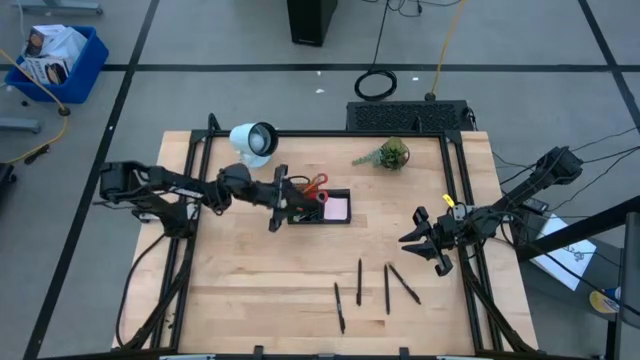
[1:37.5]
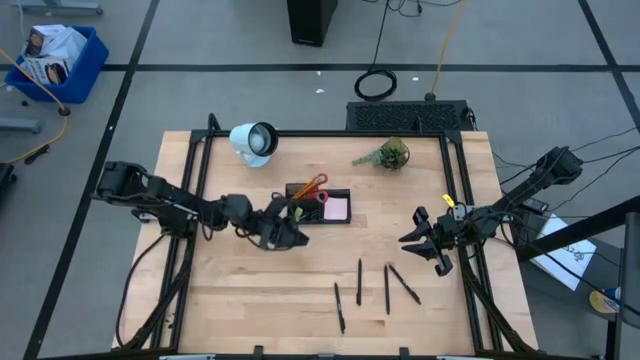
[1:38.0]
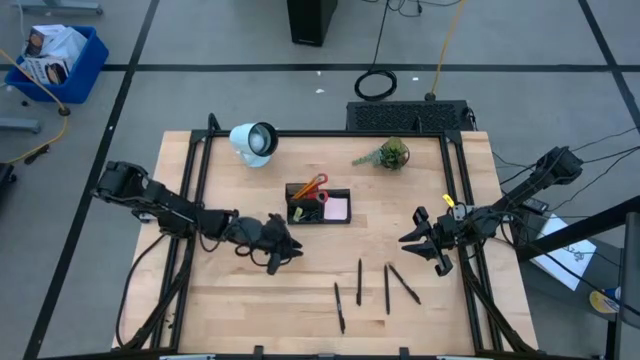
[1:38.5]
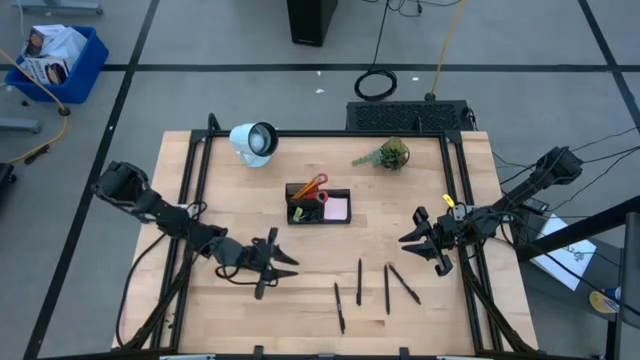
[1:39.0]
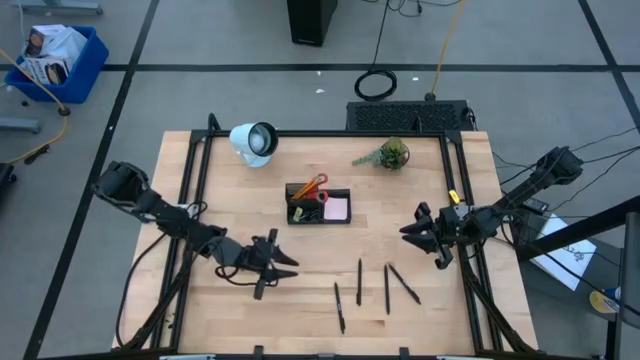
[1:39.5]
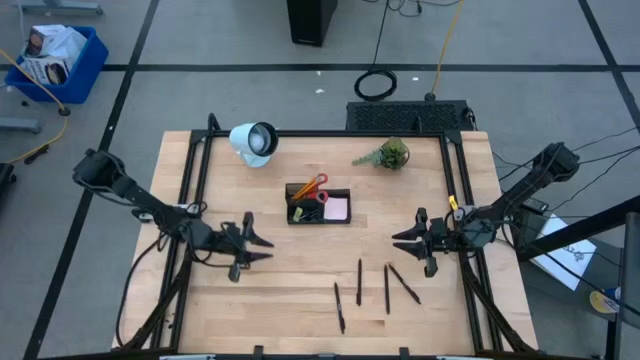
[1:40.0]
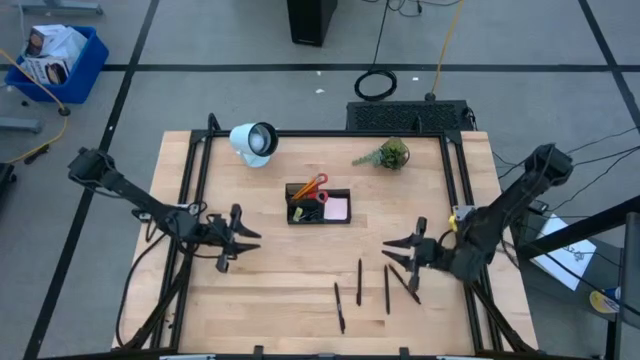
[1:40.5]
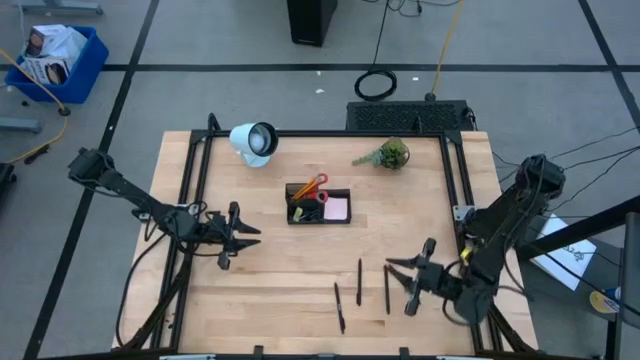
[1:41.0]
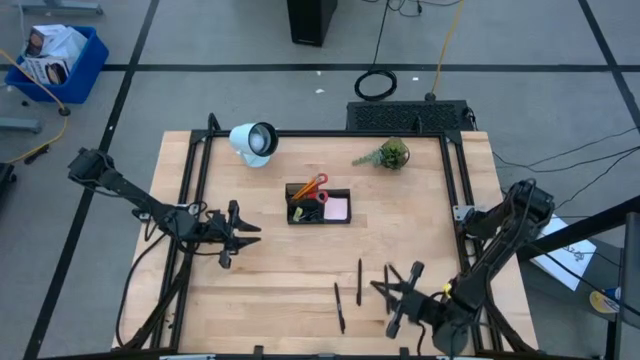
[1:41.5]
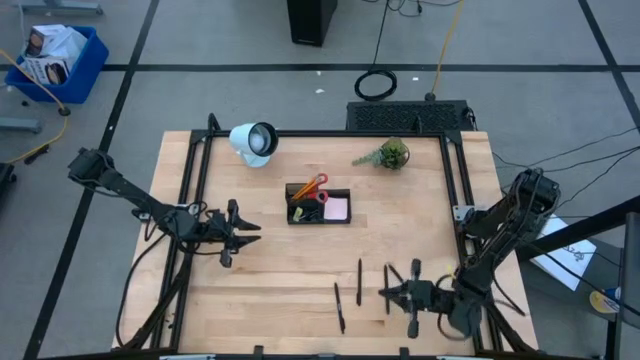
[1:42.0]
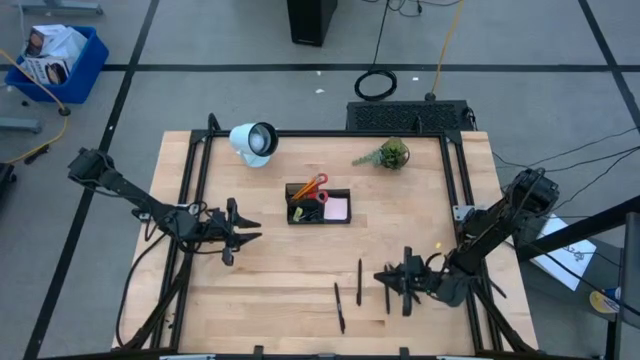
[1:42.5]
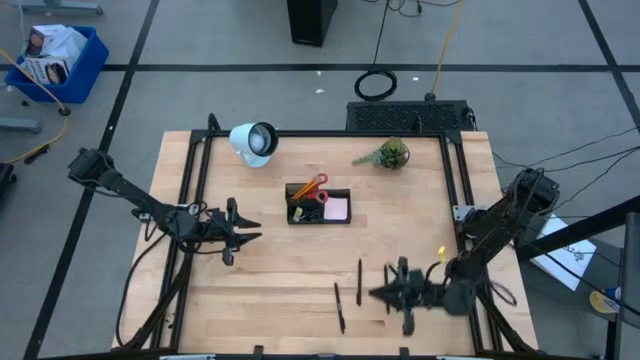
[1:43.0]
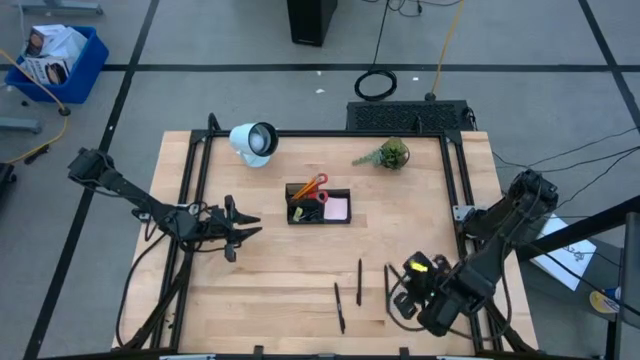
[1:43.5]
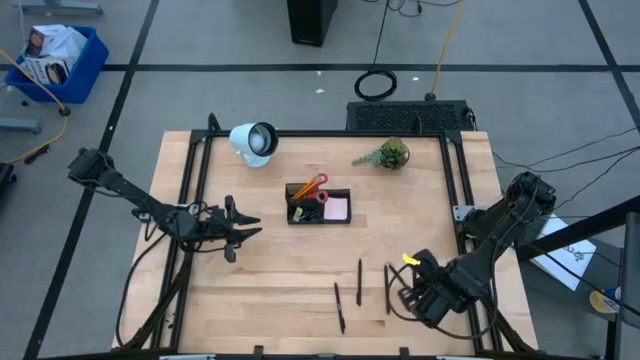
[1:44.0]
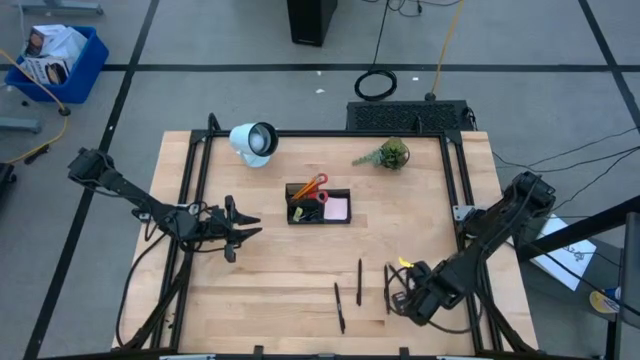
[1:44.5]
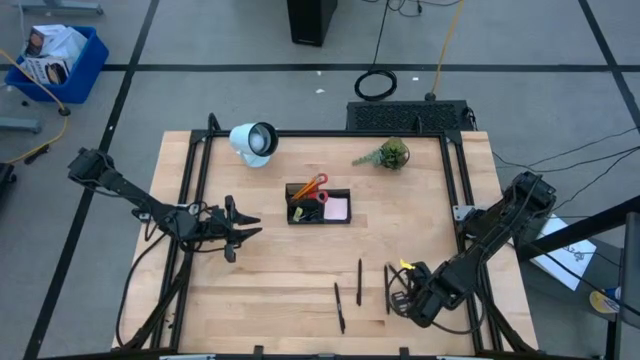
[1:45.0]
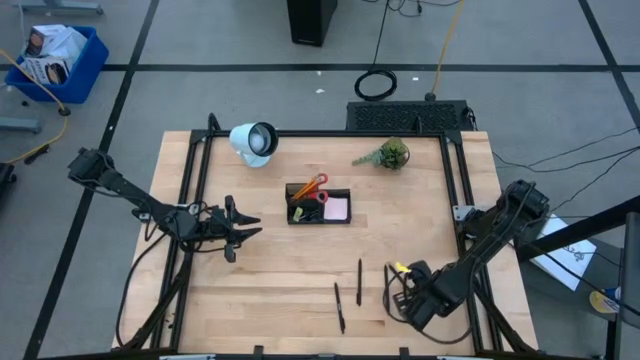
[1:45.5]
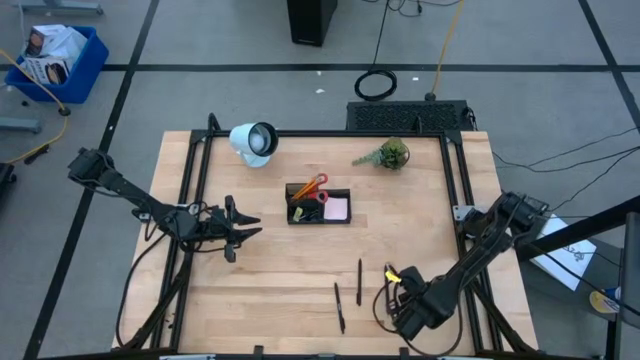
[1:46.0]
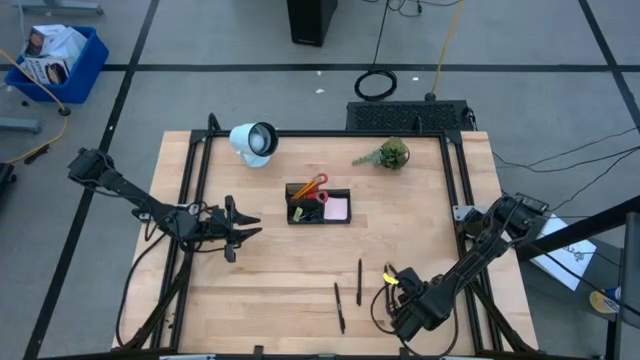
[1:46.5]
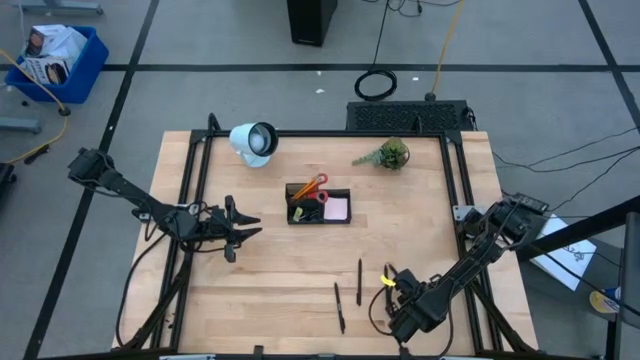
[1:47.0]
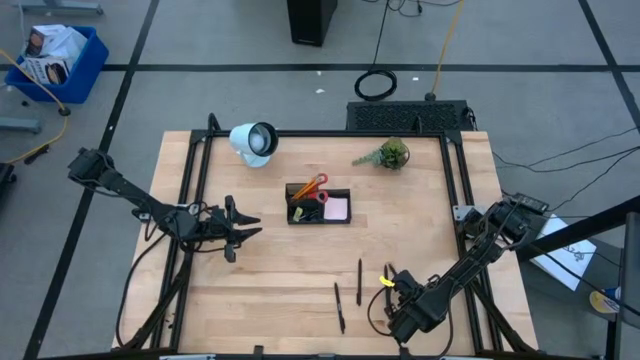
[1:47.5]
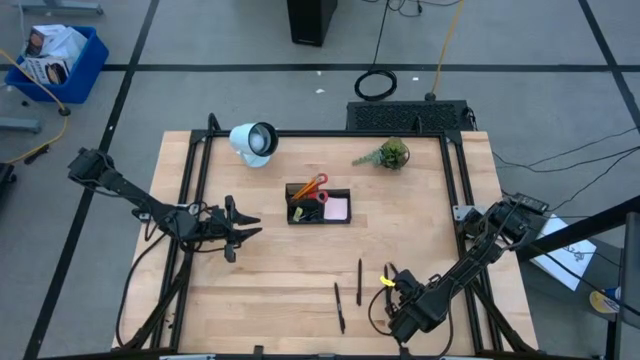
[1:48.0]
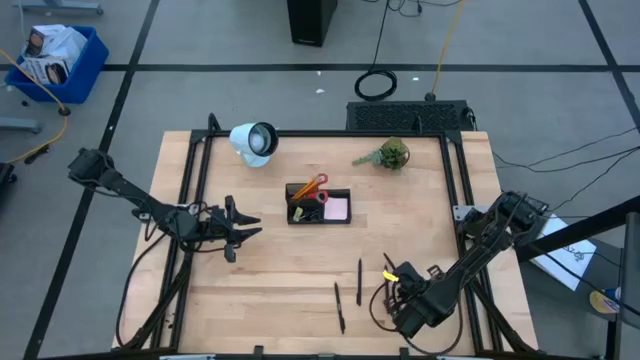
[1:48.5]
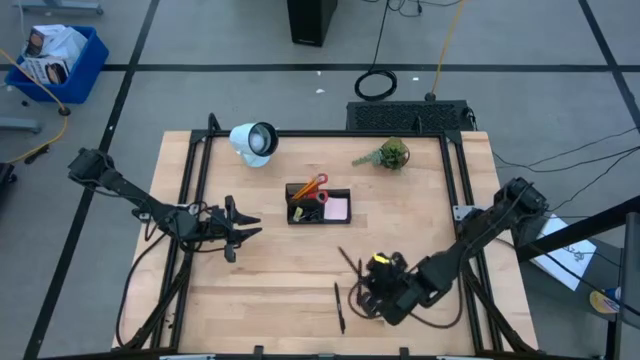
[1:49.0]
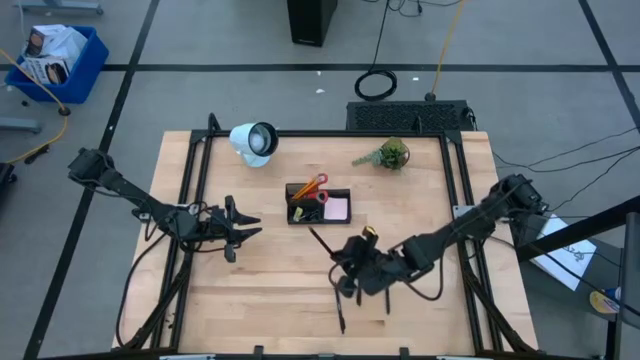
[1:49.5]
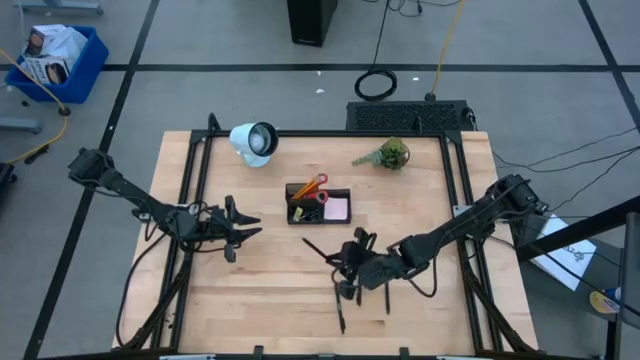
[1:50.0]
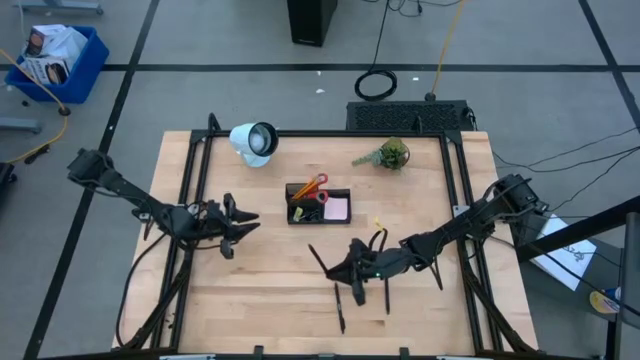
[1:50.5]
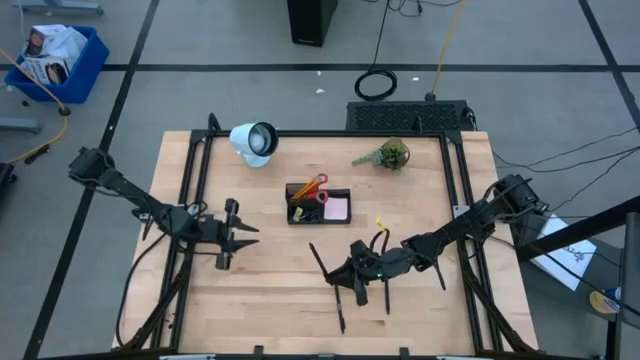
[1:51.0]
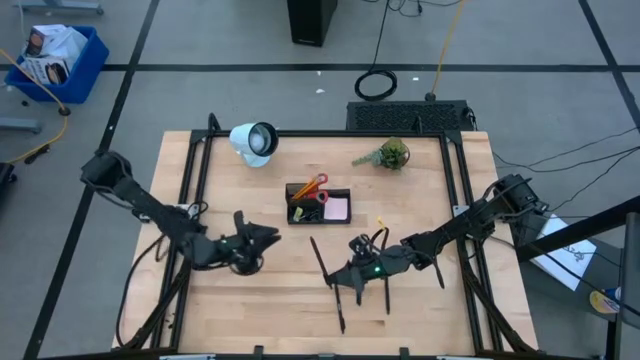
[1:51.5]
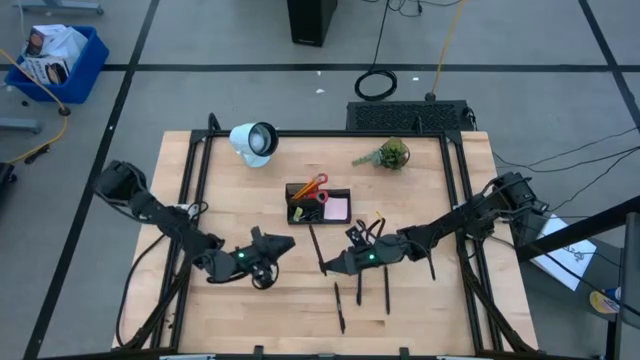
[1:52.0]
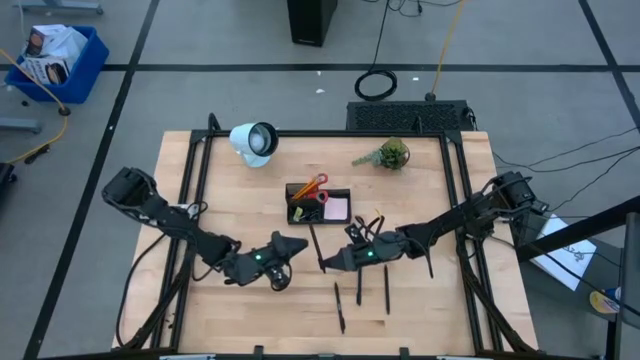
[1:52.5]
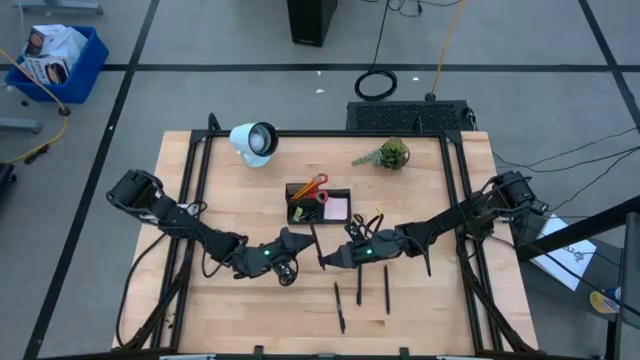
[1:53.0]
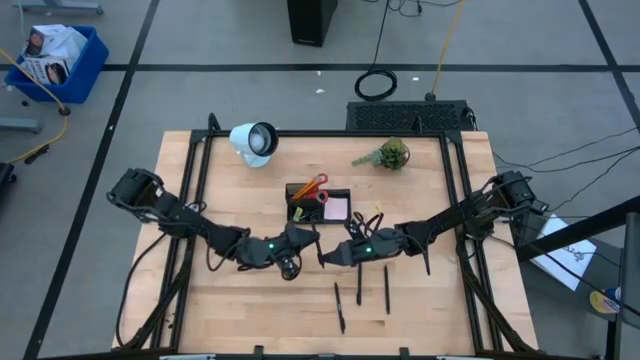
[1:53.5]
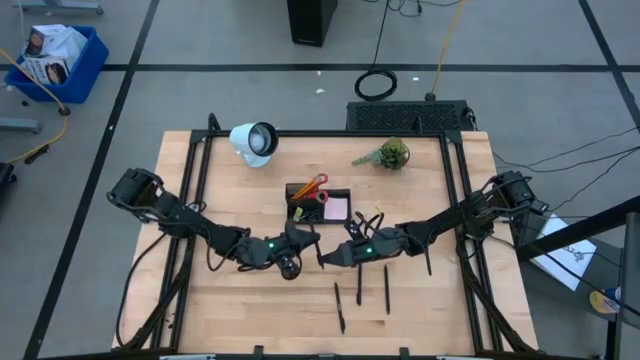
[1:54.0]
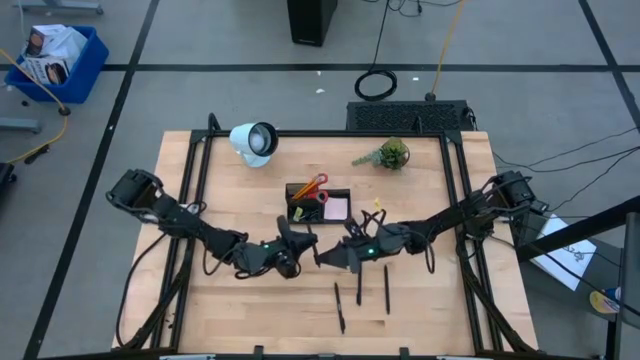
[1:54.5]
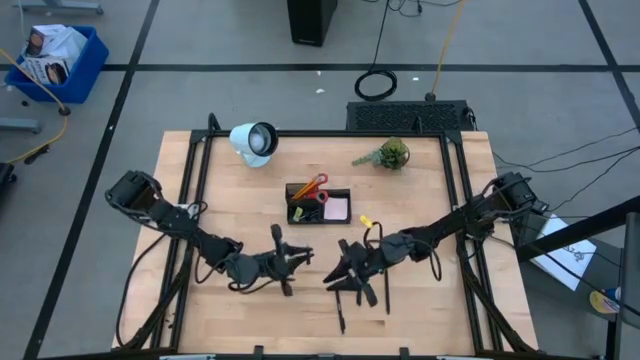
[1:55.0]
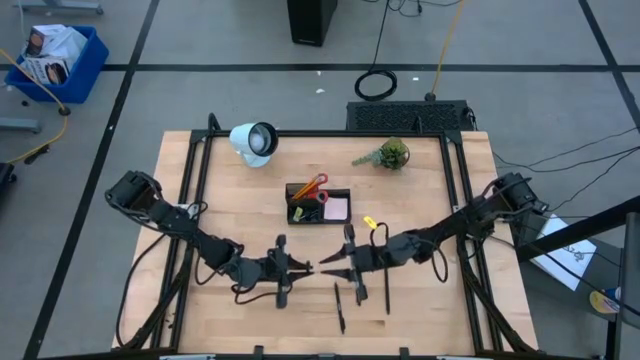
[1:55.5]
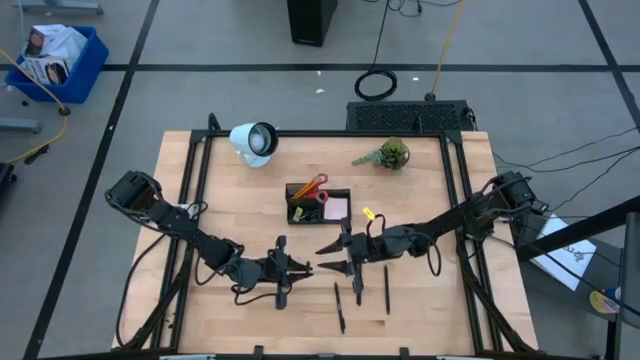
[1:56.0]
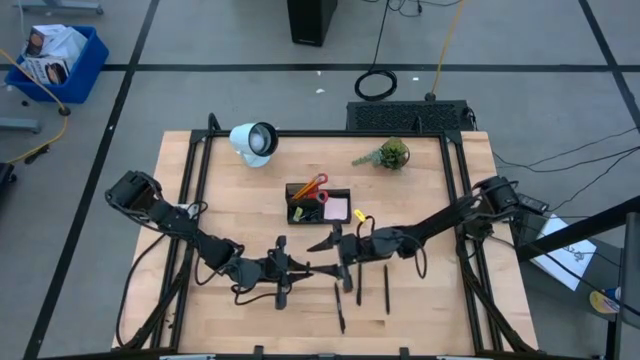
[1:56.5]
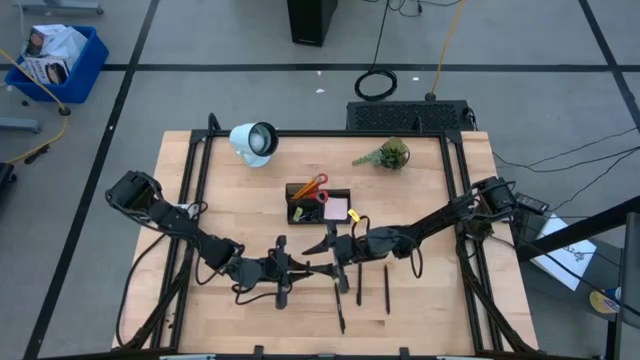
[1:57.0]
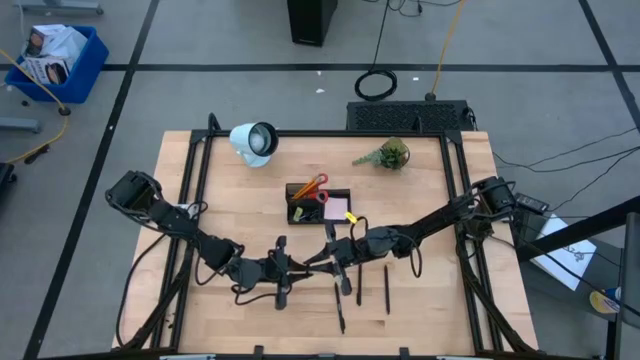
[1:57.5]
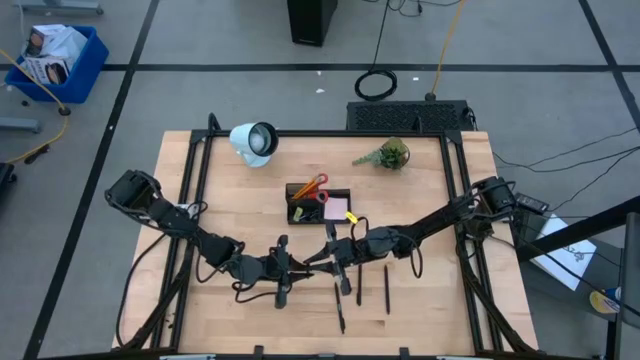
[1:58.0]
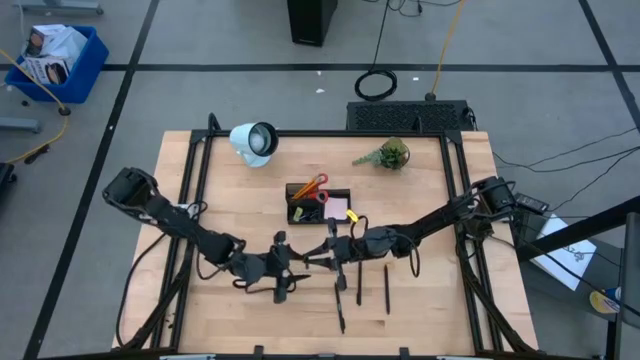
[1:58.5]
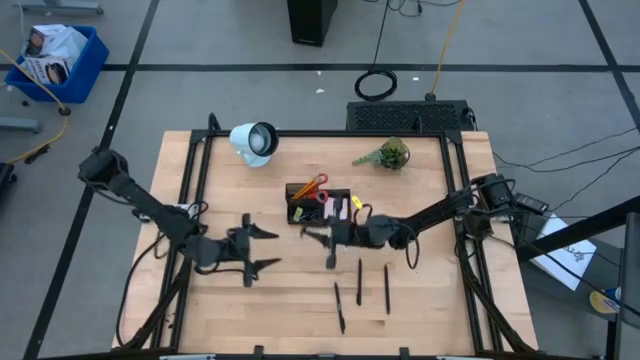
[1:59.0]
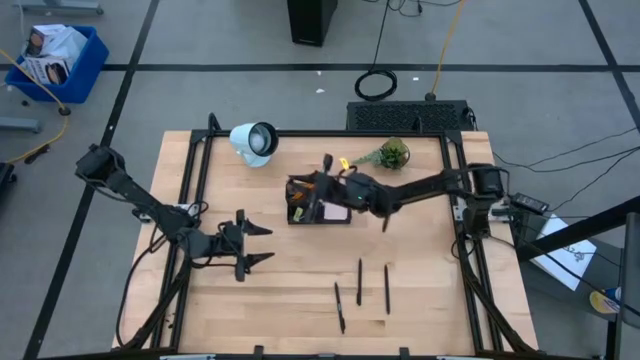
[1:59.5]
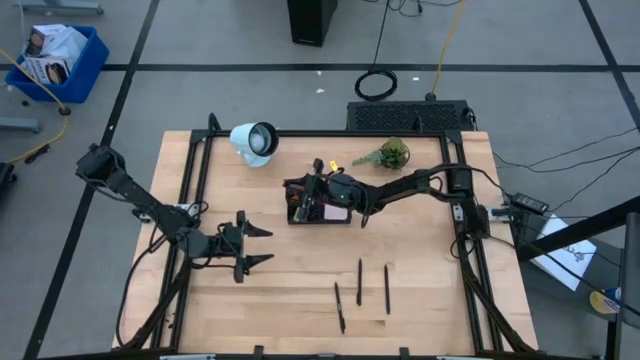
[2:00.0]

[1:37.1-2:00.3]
Task: Pick and place office supplies into organizer
Put the black pen into the black desk organizer
